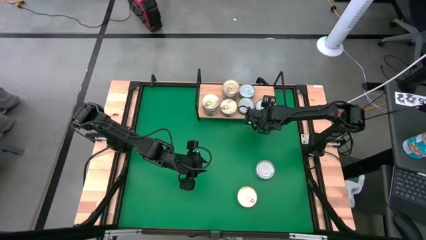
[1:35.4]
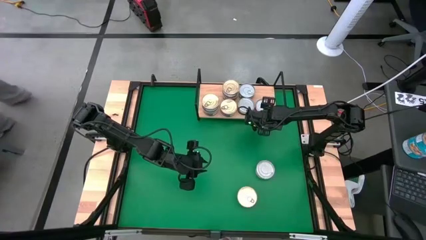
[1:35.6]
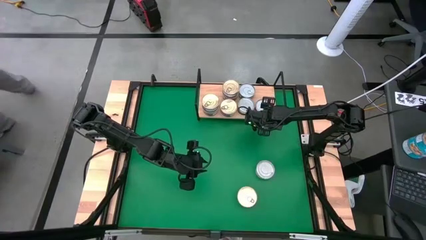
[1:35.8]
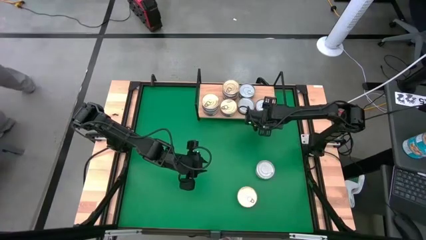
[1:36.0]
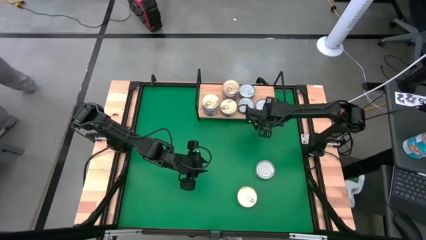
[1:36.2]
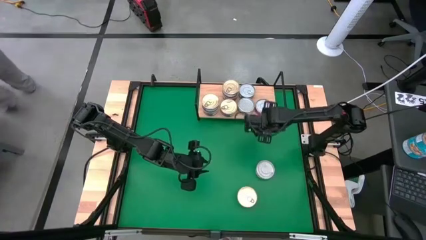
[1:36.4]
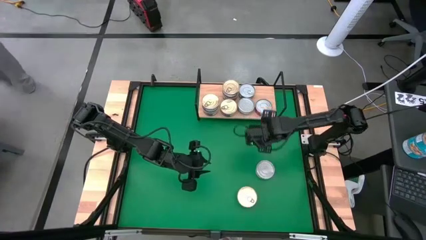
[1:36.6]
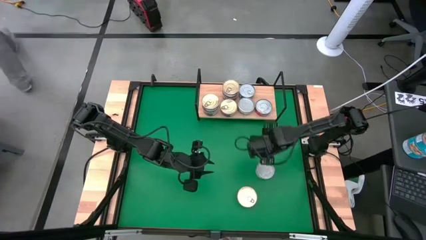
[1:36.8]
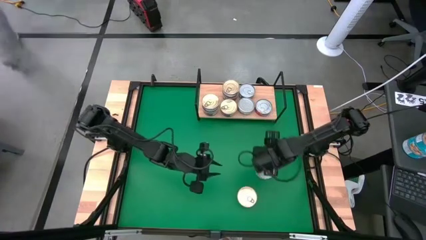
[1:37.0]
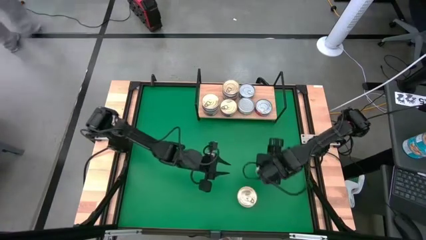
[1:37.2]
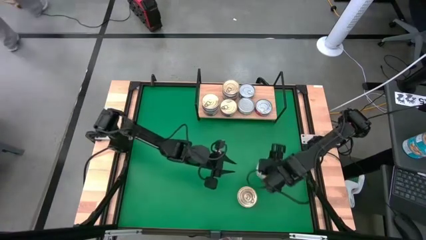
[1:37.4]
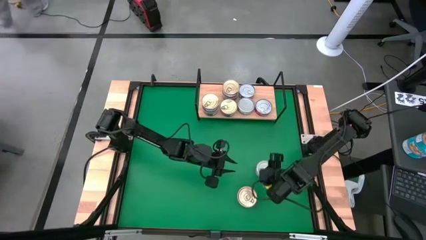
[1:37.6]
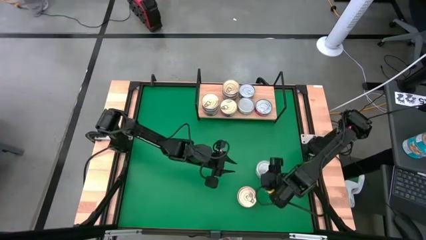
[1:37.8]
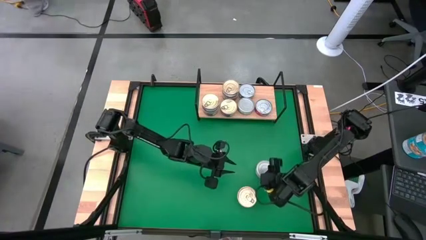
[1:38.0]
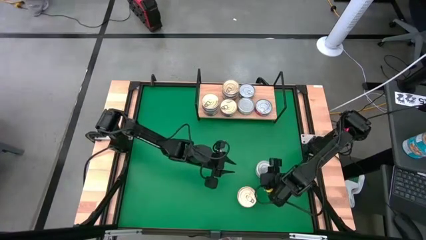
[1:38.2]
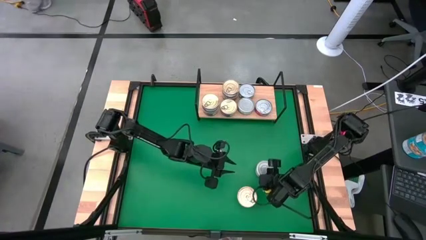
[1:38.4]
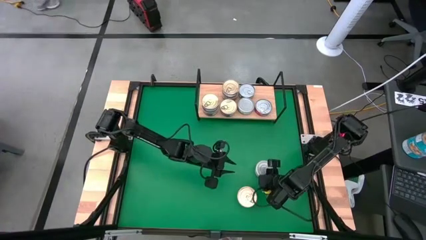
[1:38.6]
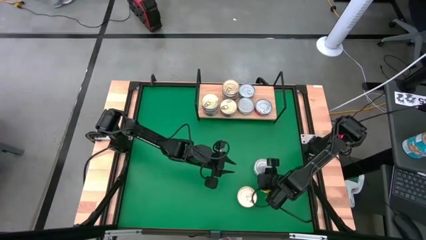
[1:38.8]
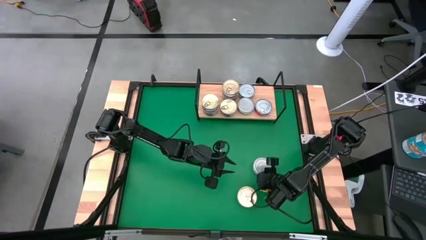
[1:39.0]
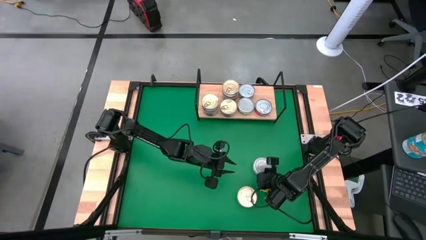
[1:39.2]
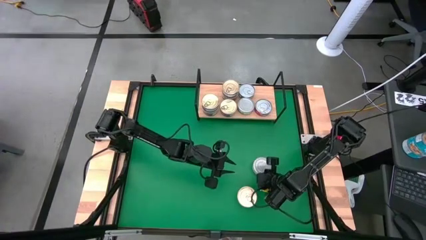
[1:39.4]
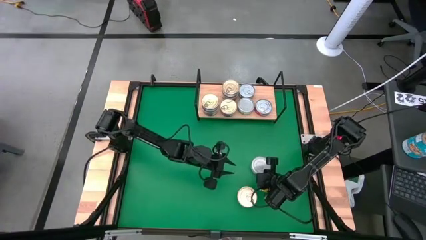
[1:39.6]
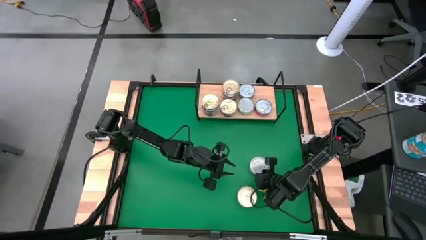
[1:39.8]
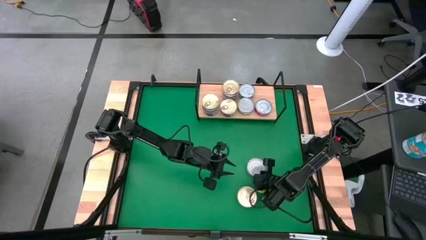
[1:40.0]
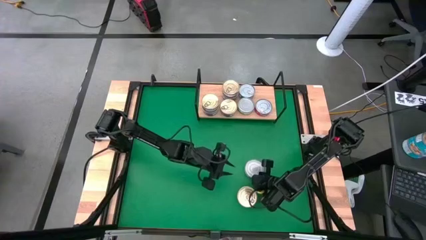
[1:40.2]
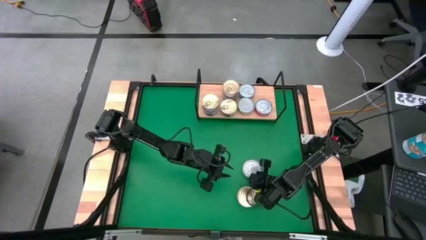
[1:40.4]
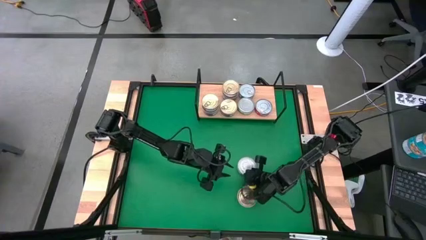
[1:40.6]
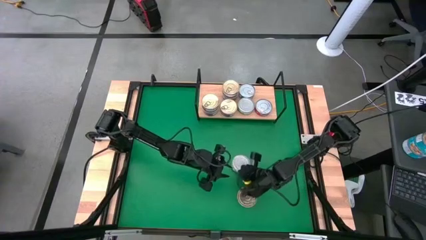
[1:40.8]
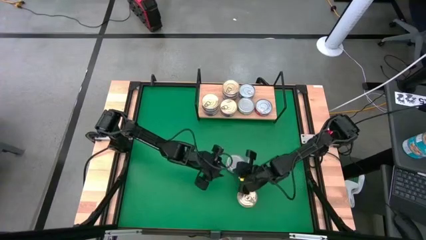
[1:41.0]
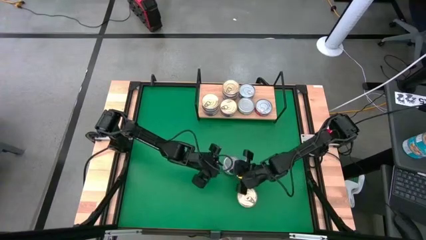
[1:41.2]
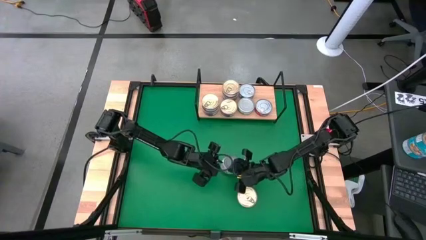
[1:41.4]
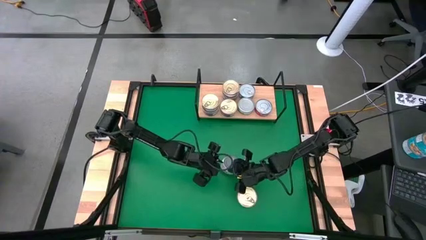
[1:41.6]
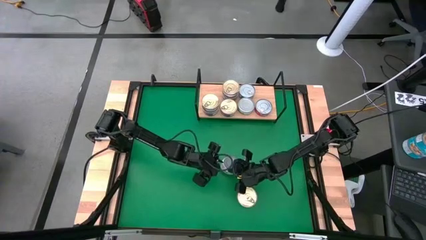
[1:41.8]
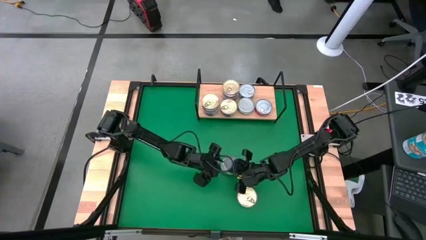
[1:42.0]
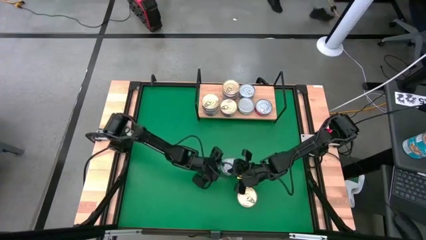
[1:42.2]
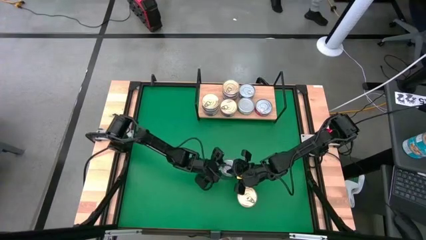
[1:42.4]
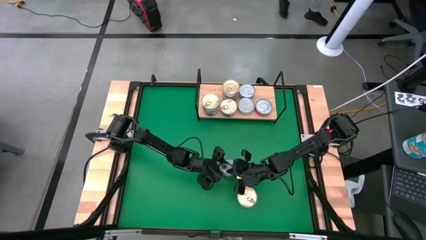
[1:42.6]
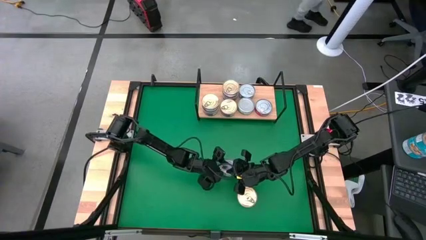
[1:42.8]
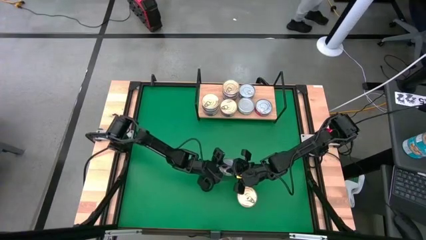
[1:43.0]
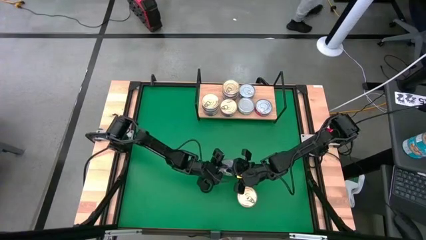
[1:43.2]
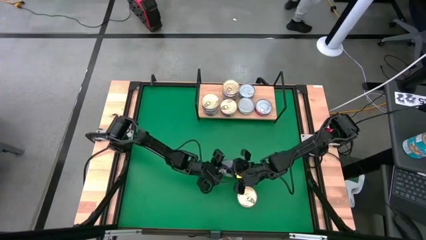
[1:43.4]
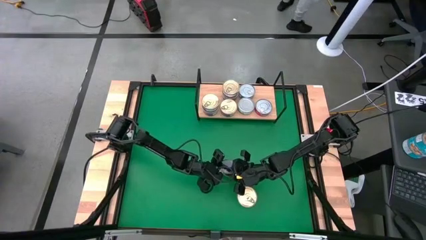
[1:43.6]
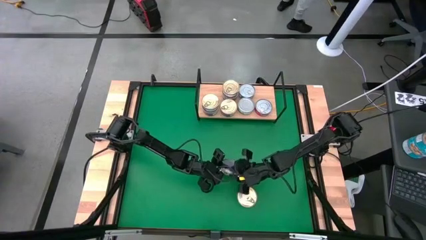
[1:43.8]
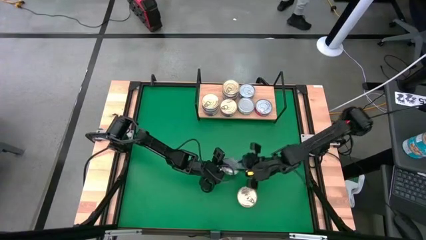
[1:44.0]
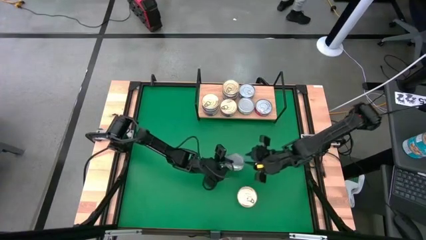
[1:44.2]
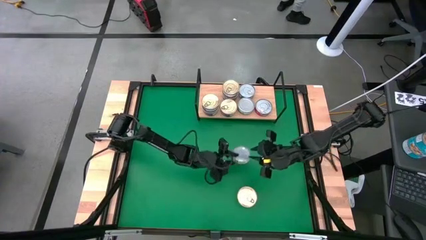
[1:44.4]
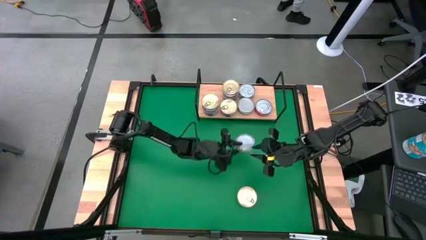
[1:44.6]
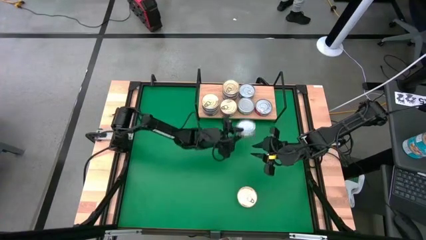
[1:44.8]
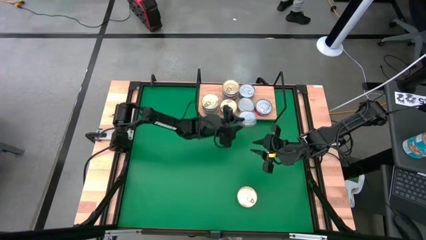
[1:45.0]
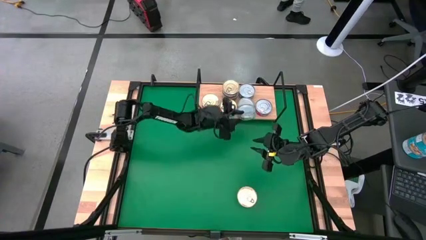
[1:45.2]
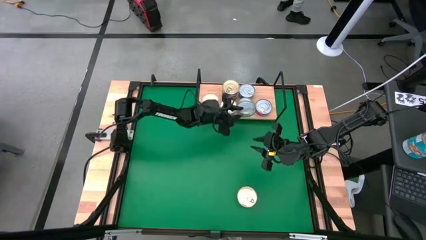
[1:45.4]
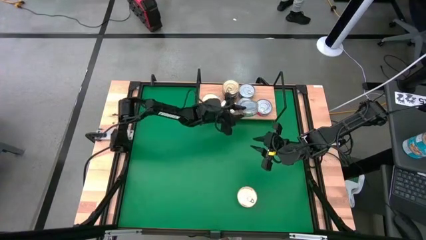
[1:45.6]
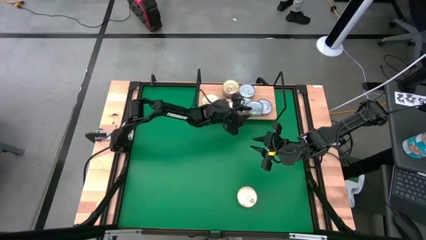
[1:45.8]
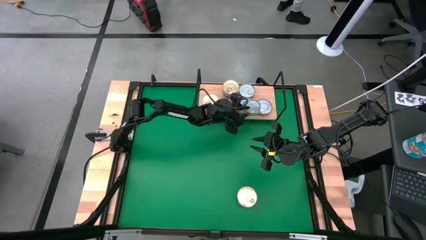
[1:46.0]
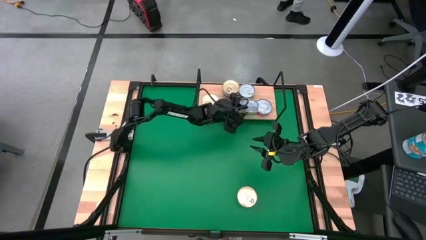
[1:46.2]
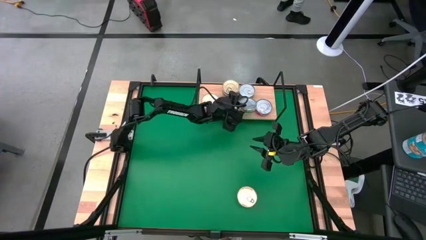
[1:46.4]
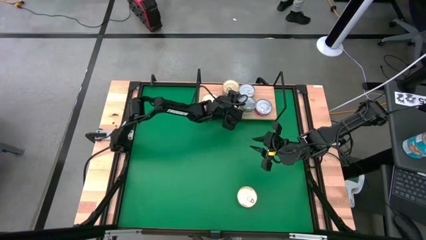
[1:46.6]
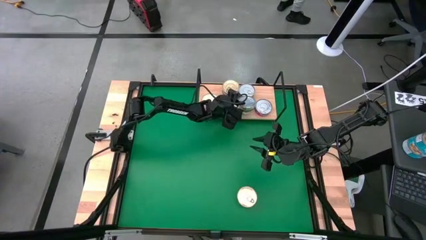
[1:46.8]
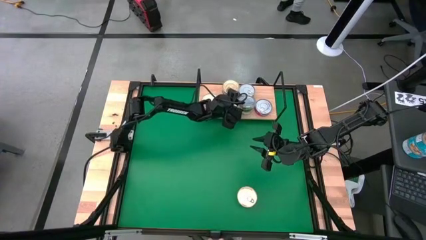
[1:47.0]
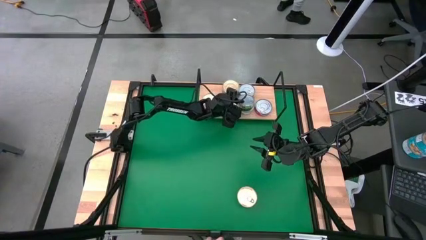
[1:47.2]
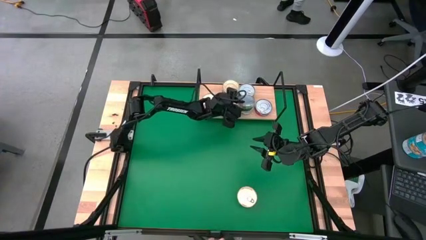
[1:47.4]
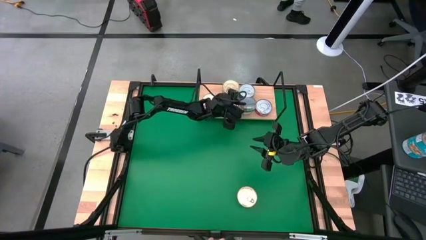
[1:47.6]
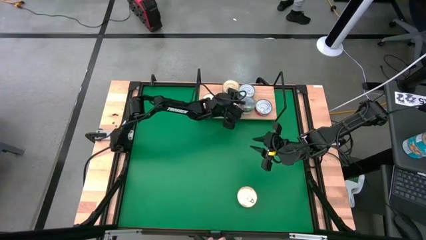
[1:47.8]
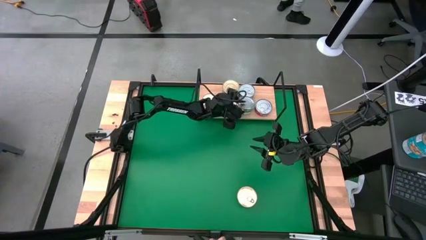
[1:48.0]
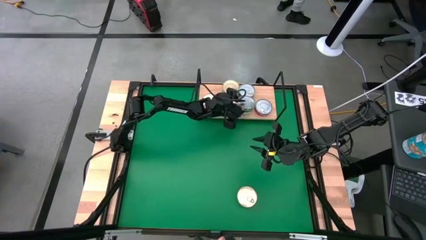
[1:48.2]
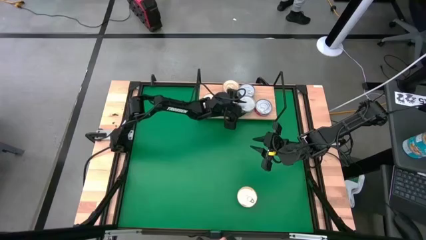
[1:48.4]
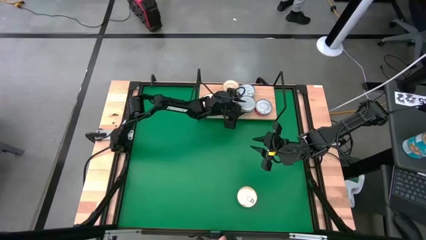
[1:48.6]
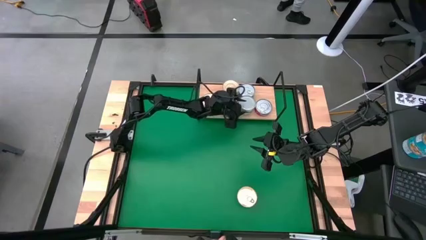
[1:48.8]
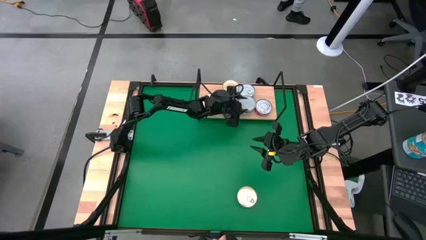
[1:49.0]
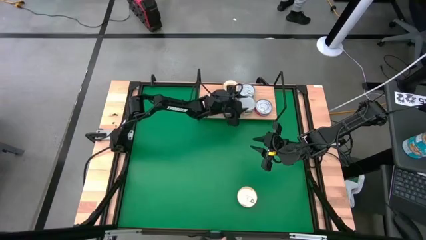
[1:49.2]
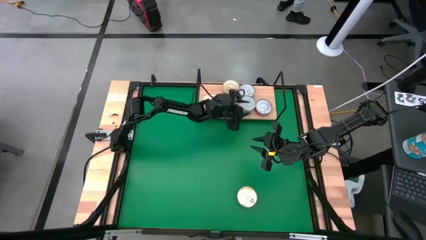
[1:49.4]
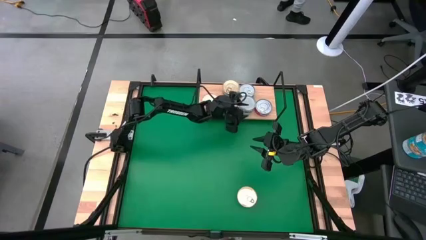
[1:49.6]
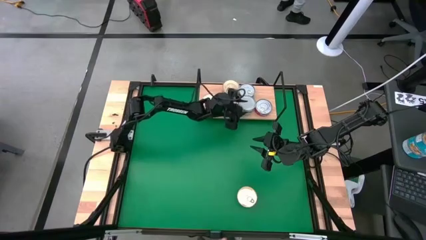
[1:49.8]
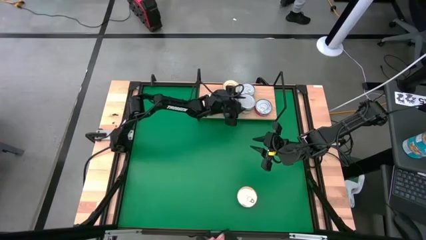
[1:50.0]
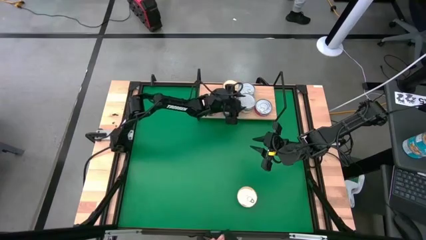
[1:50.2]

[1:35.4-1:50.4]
Task: Stack canned seafood by type on shelf
Stack the green tuna can on top of the green tuna can on the shelf
